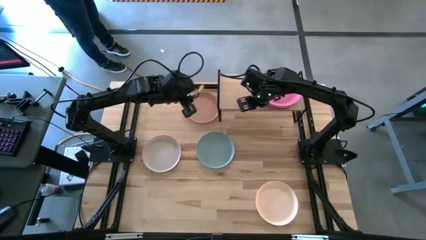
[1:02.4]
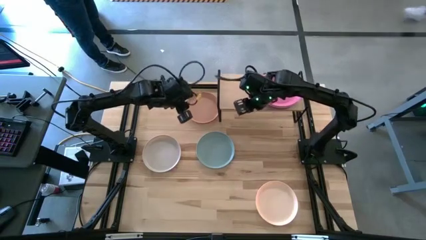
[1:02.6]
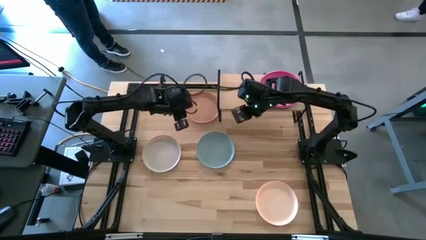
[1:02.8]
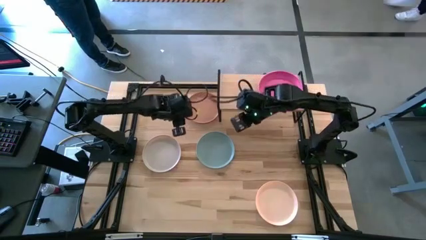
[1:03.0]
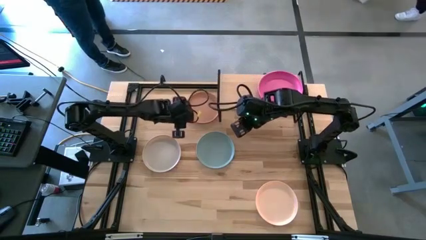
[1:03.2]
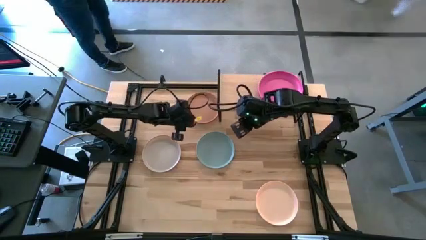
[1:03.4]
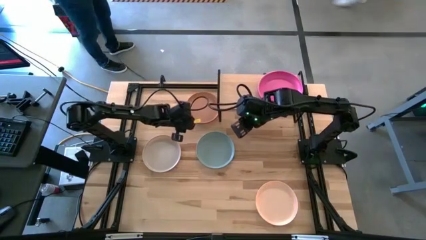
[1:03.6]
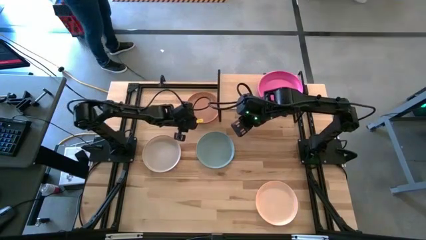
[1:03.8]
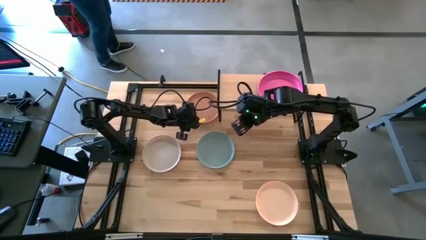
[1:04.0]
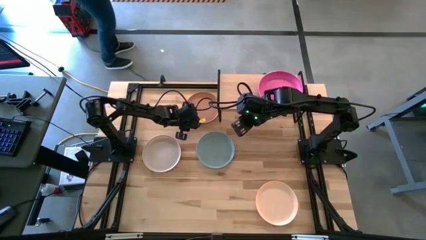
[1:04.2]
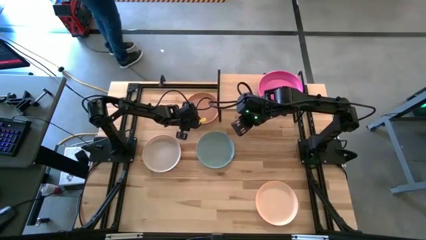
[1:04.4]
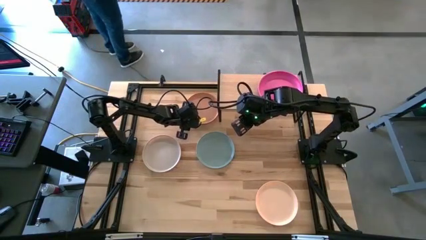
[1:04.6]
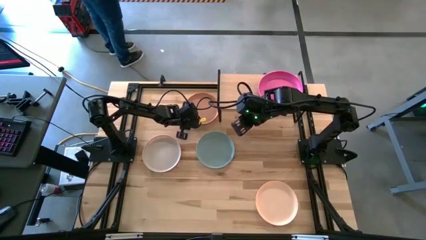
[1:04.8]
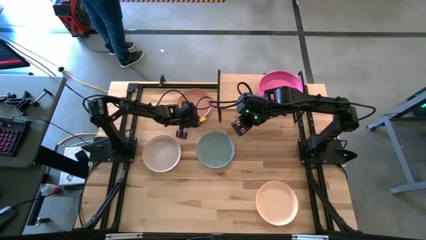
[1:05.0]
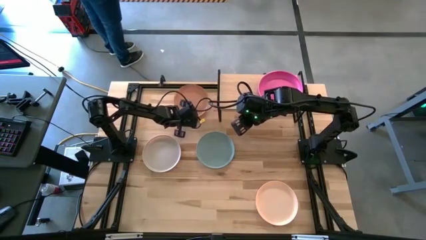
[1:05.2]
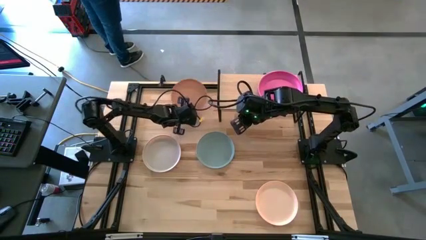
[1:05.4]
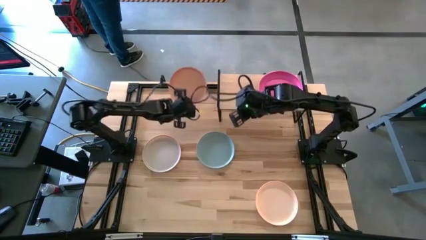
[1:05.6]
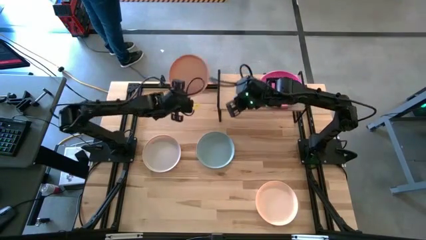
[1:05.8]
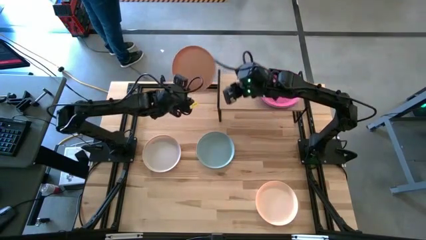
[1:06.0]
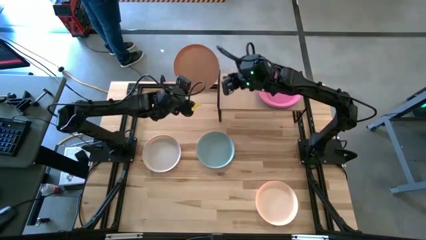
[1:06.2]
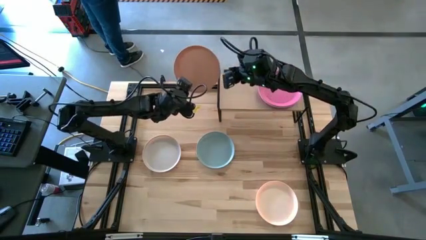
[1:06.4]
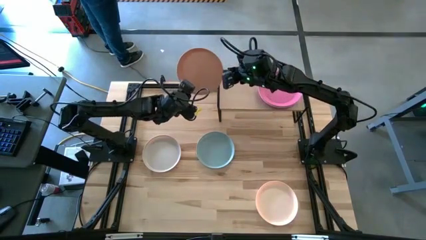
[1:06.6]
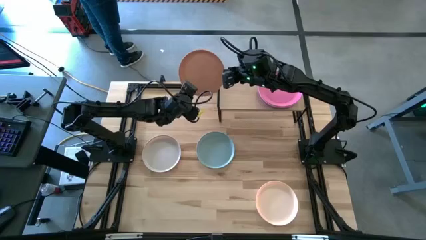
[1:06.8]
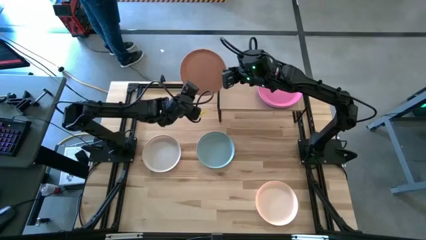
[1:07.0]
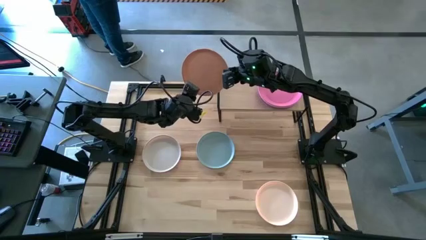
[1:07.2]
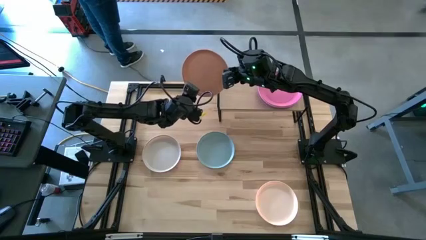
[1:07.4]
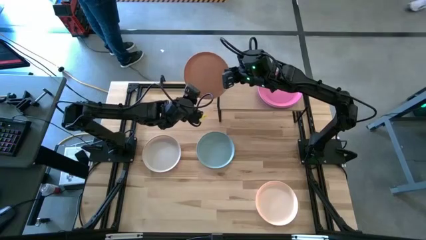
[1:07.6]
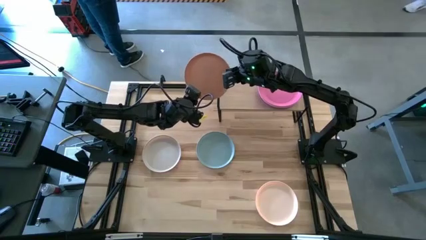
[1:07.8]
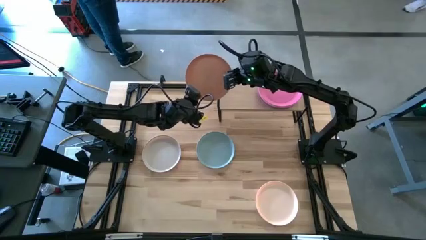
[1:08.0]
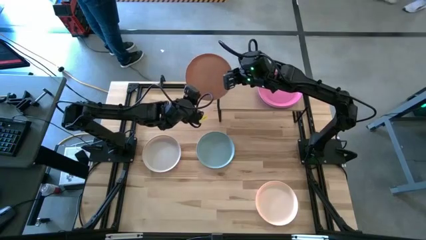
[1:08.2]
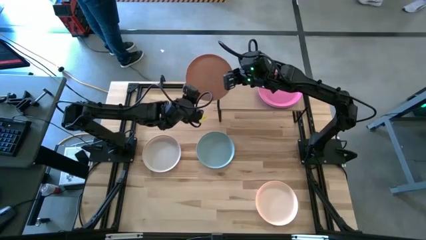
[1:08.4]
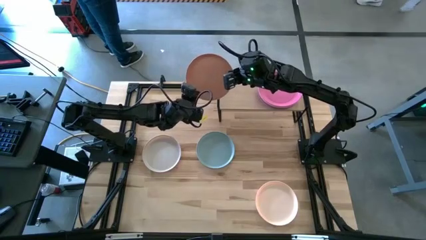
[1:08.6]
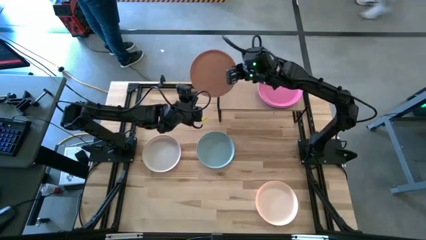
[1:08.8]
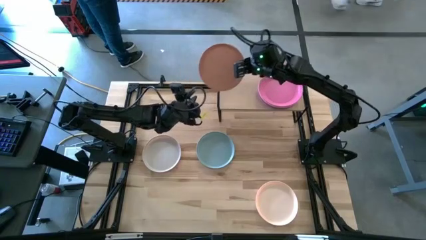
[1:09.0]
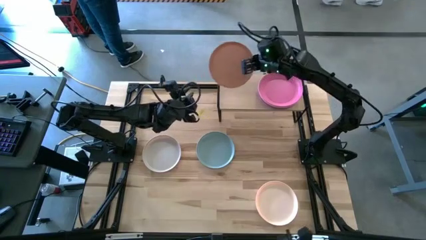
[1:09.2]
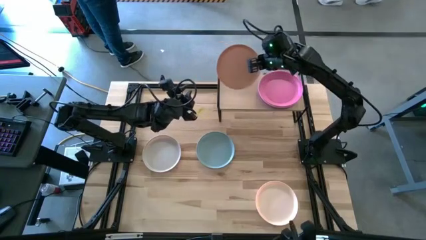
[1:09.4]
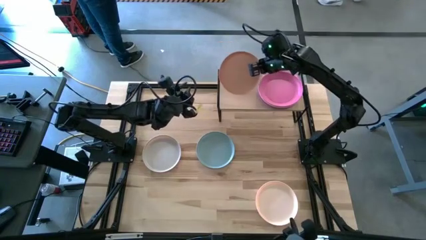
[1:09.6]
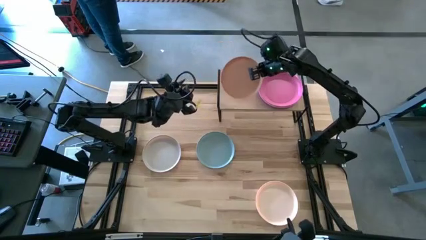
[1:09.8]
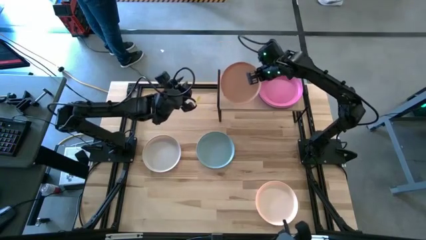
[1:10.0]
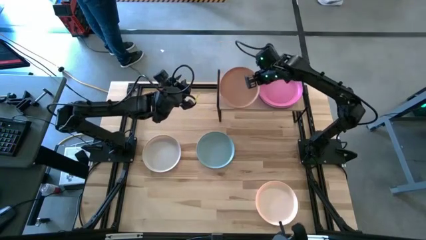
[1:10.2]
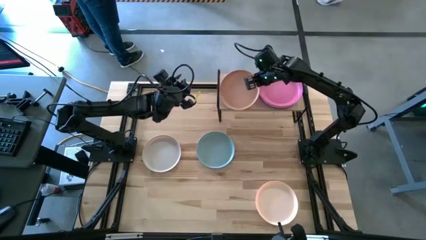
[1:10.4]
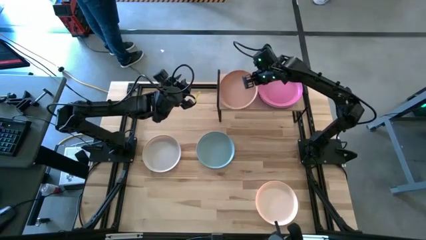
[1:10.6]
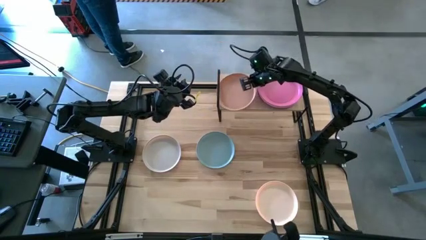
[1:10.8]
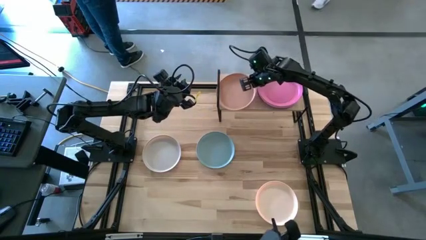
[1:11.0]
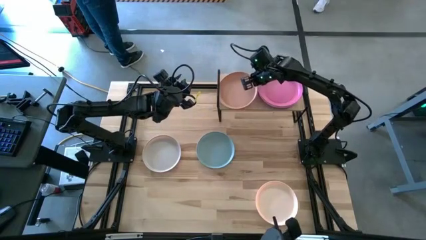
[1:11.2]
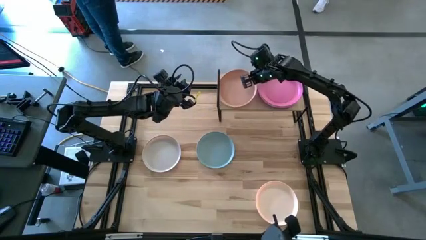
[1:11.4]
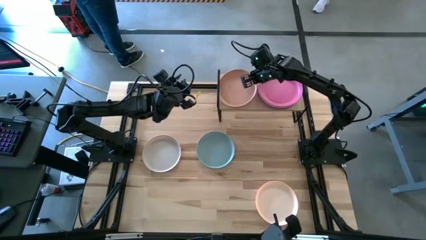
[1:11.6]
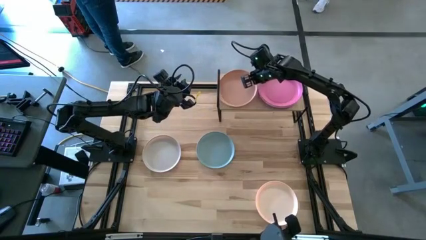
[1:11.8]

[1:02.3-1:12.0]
Task: Place and stack plates onto a shelf
Put the brown plate on the shelf

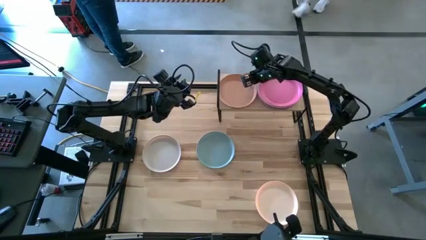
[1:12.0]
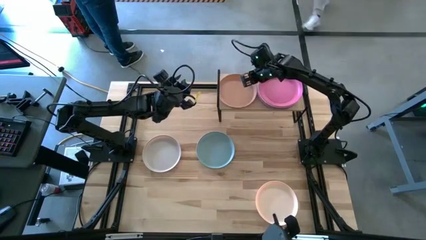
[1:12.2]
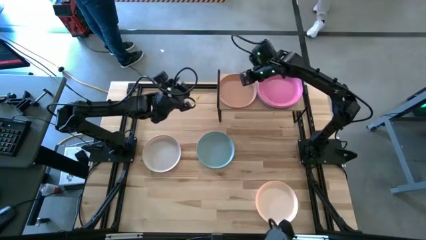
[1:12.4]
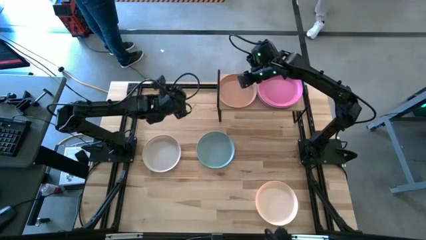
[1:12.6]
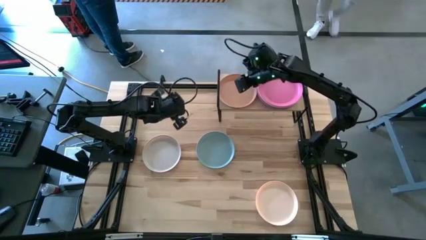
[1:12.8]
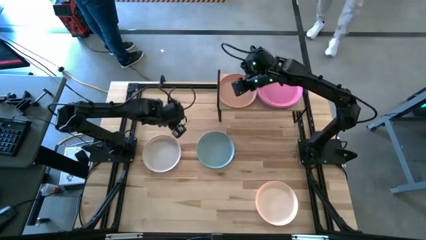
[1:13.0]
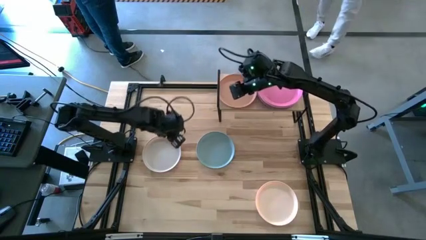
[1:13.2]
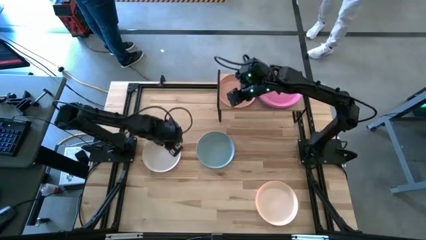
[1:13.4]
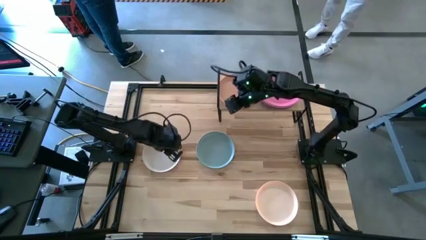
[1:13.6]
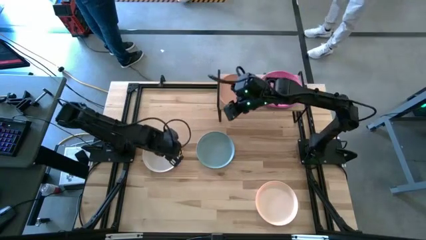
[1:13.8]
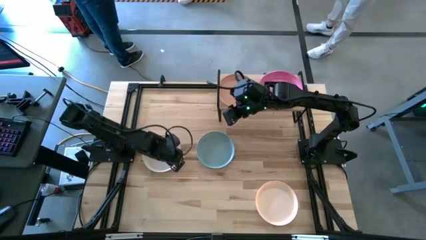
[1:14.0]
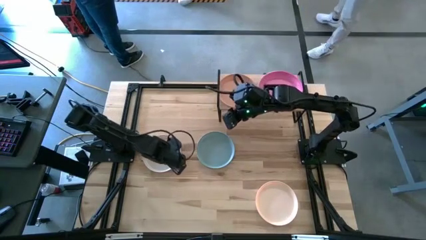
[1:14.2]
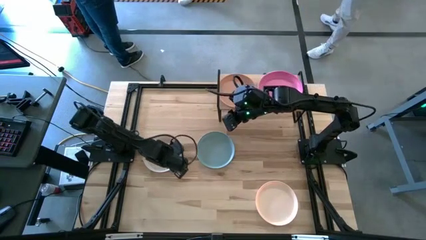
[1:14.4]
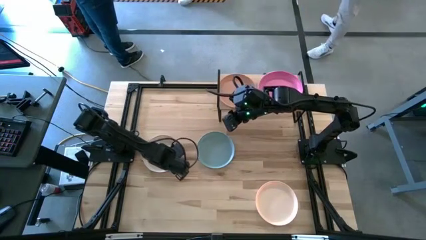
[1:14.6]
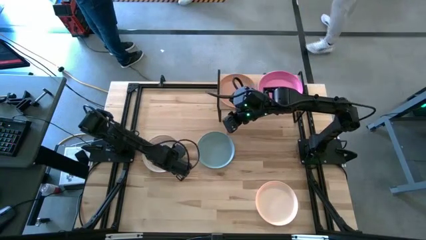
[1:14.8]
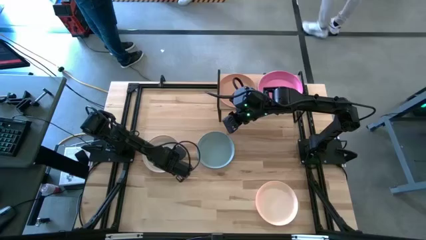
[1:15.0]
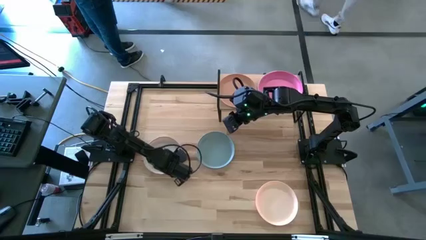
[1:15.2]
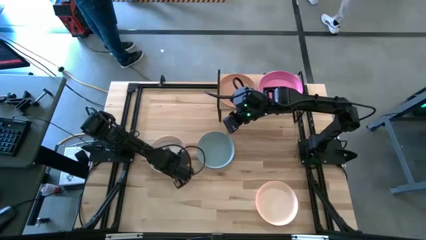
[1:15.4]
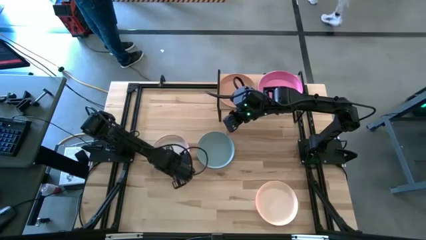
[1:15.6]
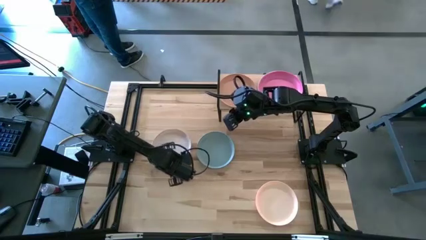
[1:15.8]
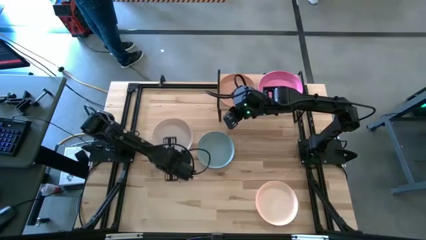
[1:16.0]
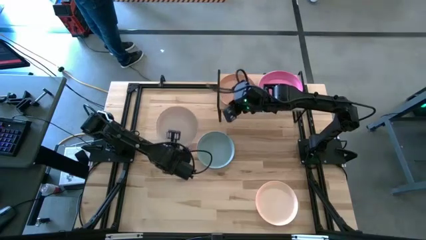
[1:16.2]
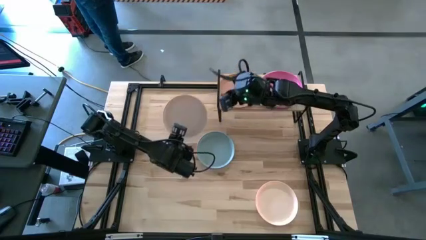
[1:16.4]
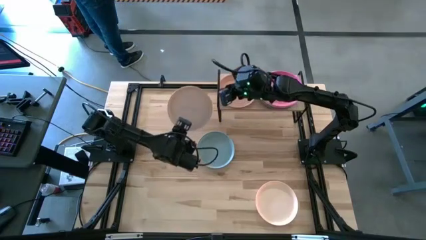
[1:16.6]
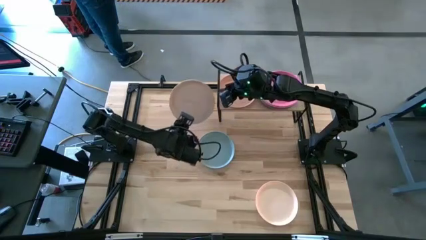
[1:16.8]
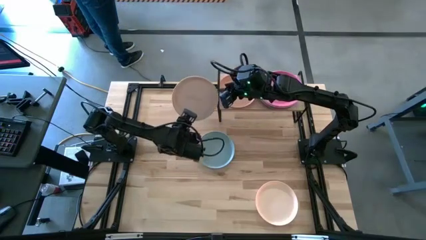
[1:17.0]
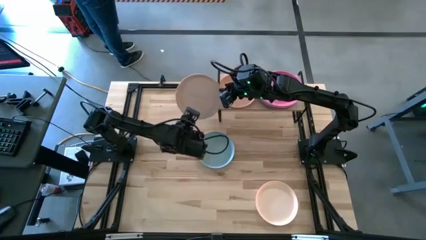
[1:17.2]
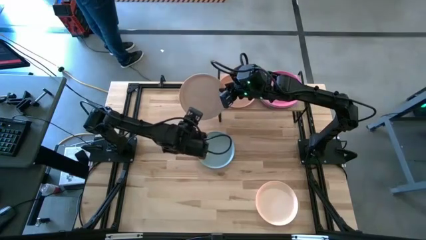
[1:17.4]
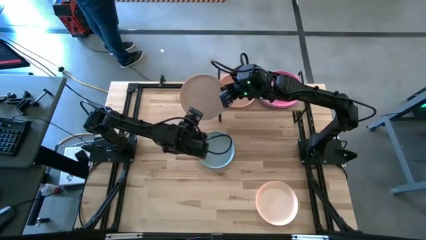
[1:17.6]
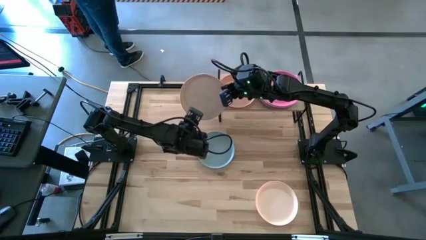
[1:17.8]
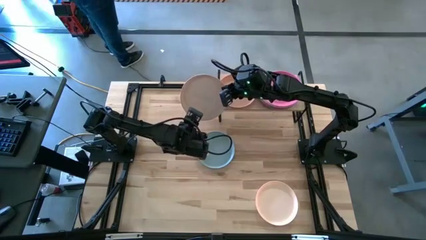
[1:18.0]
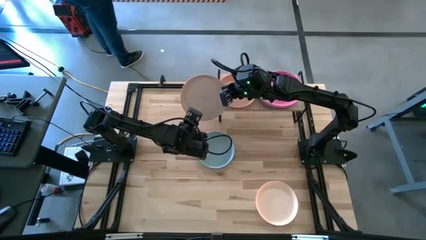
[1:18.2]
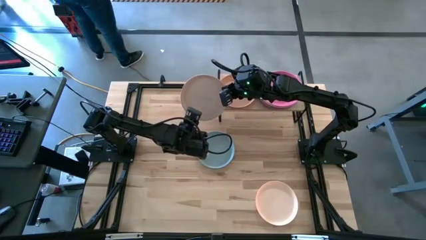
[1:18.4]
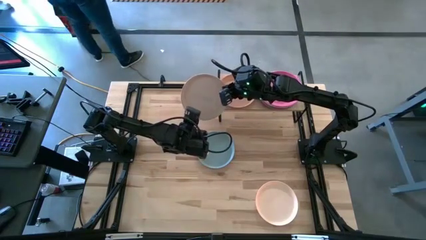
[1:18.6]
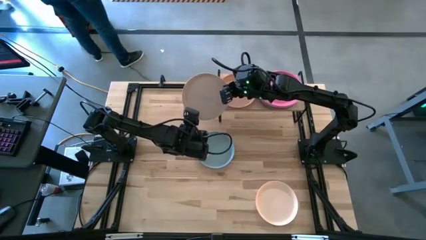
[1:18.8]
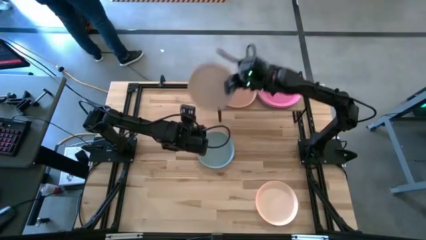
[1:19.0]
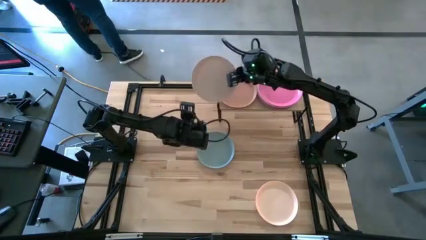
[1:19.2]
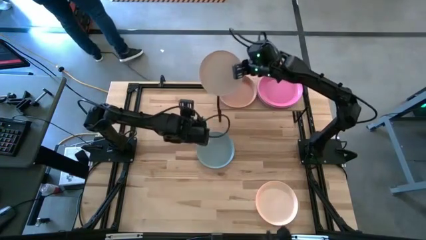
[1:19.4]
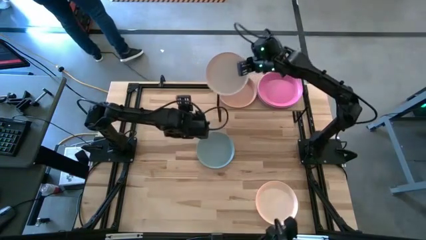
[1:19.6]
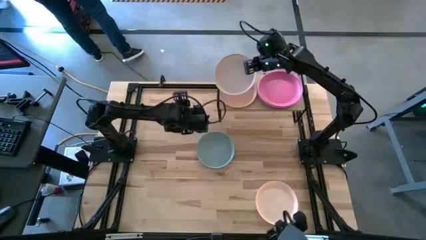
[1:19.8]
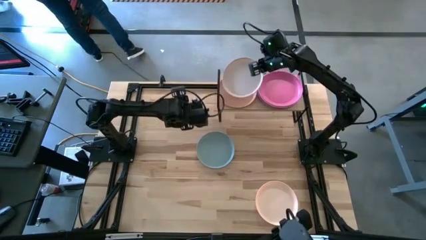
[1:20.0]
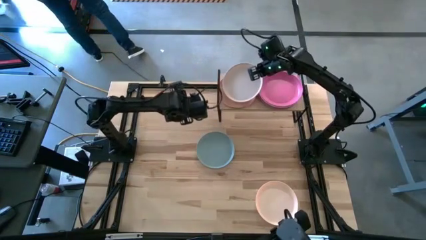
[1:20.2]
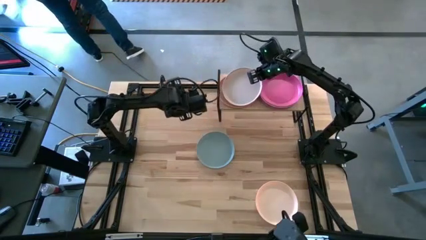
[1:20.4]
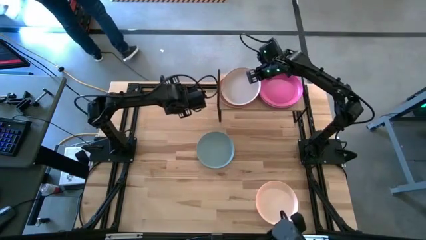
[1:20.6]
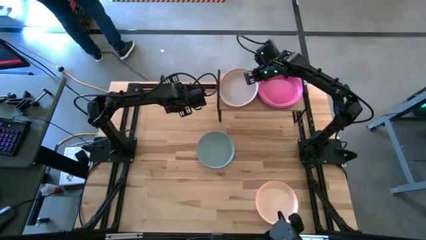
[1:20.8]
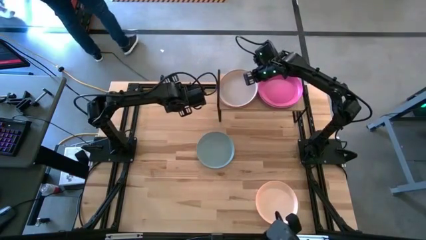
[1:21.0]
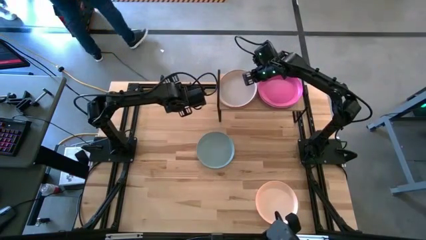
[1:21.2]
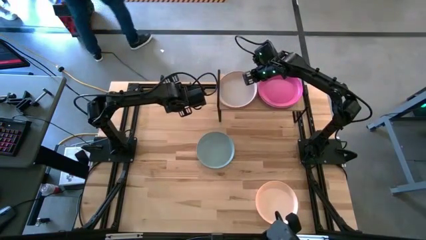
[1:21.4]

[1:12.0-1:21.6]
Stack the gray plate on the brown plate on the shelf
